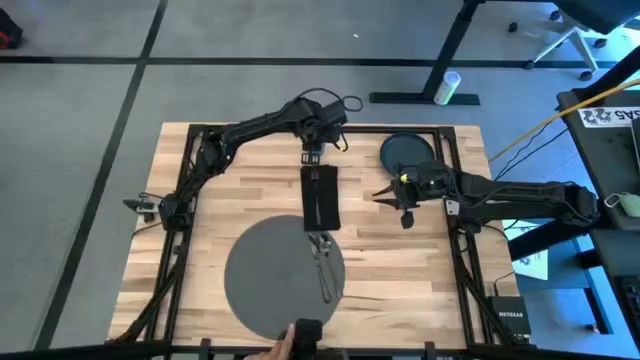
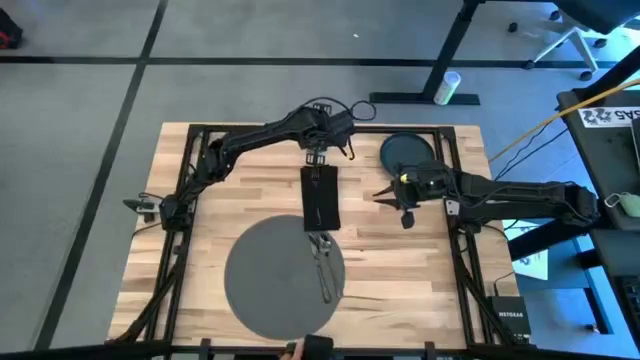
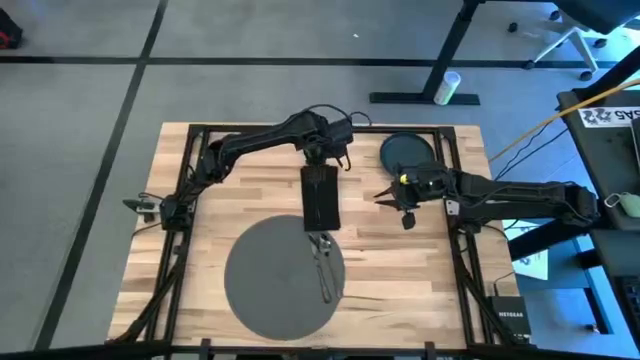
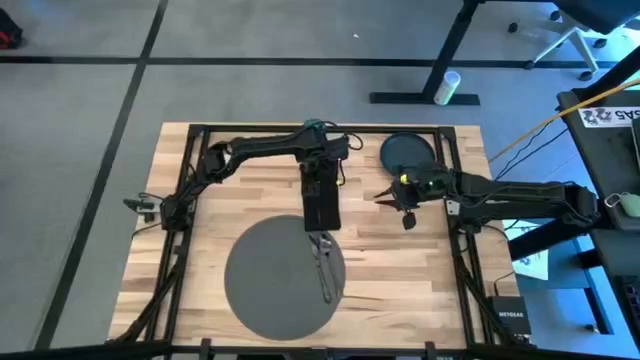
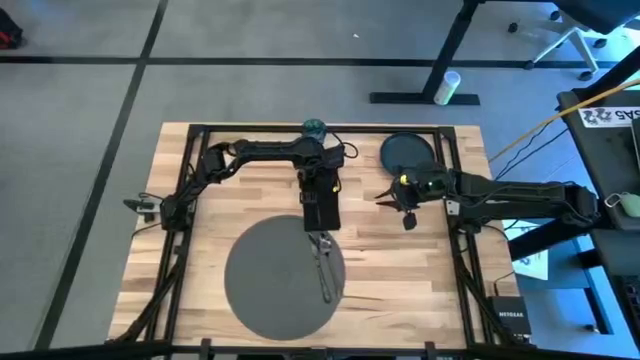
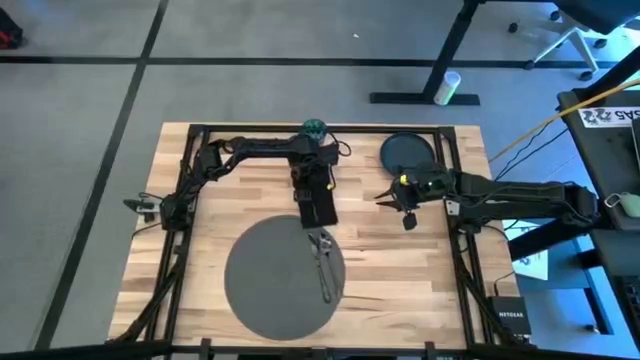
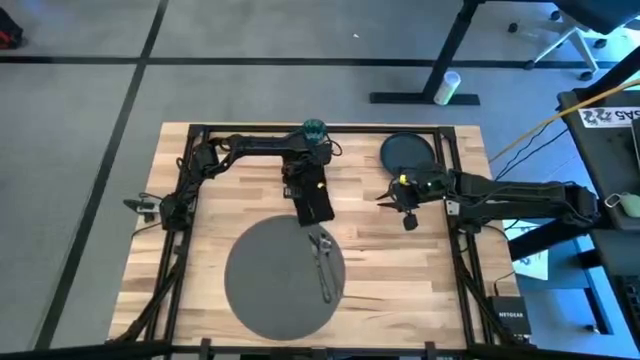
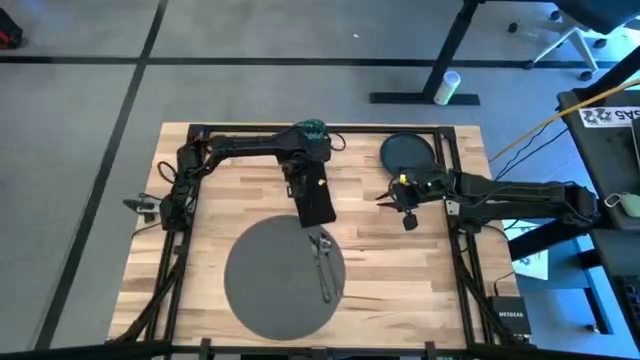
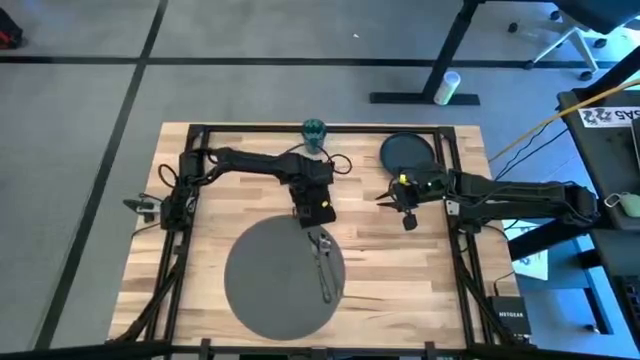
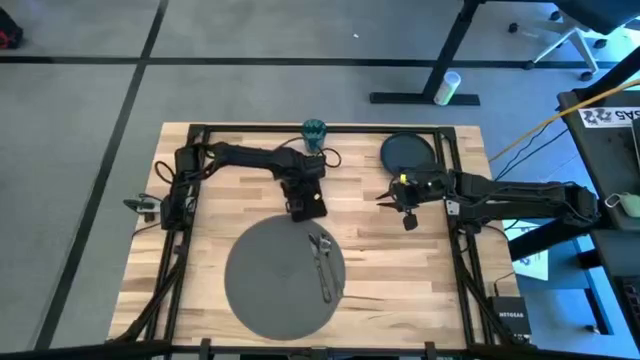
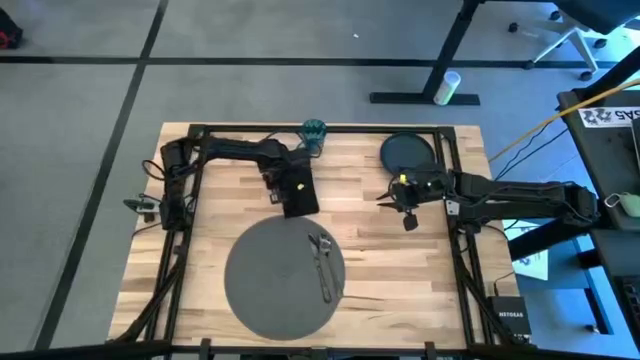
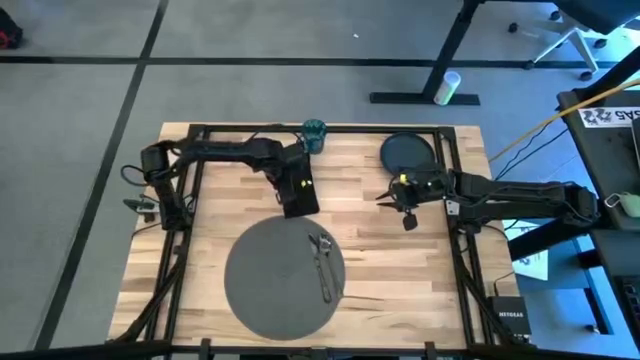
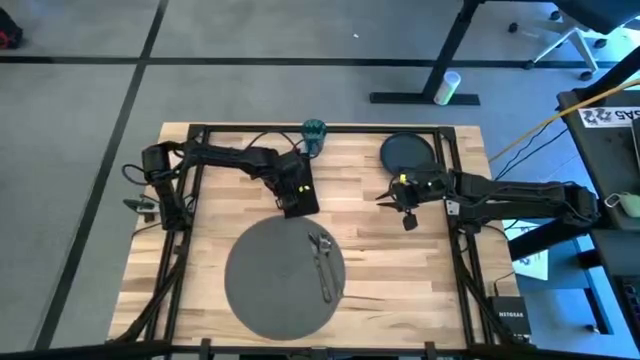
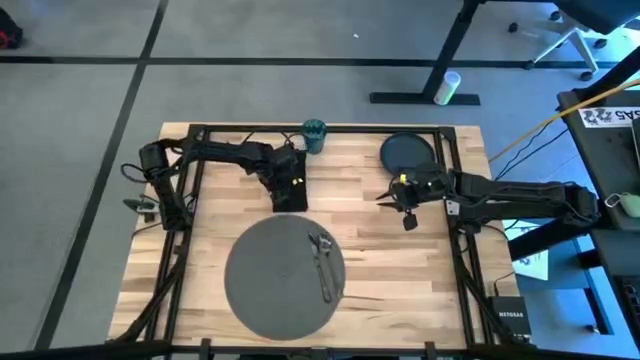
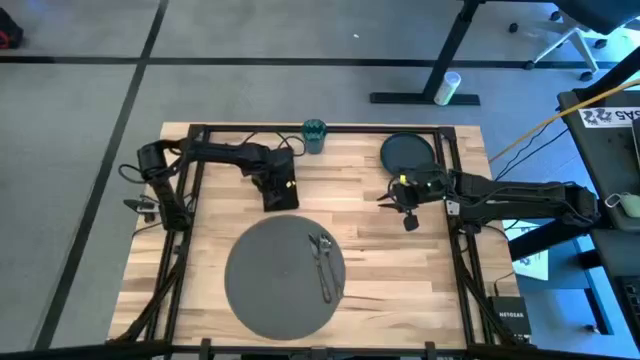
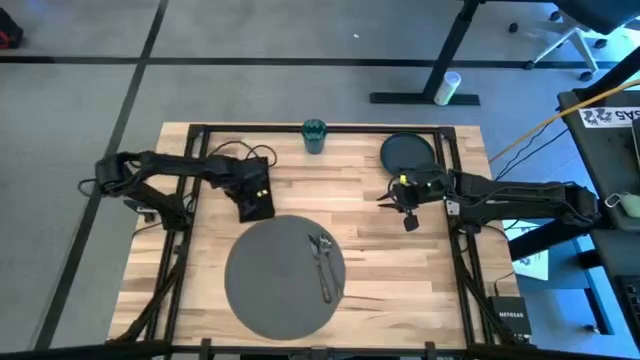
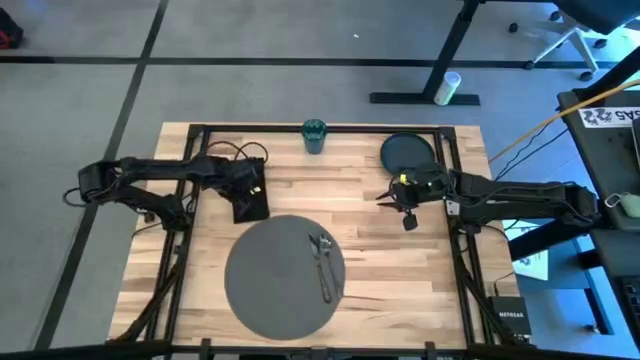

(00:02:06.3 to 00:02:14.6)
Task: Set table place
Adjust the black table napkin

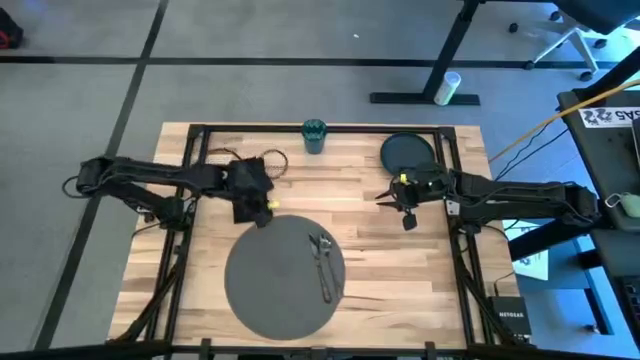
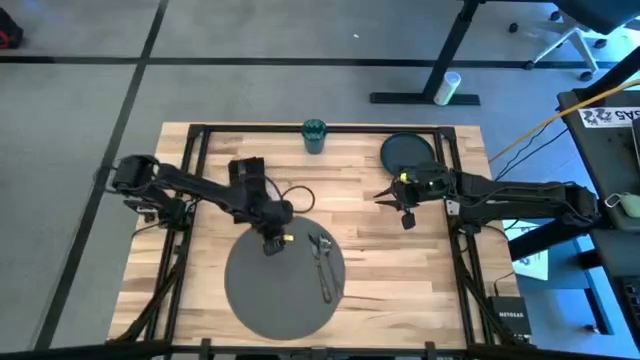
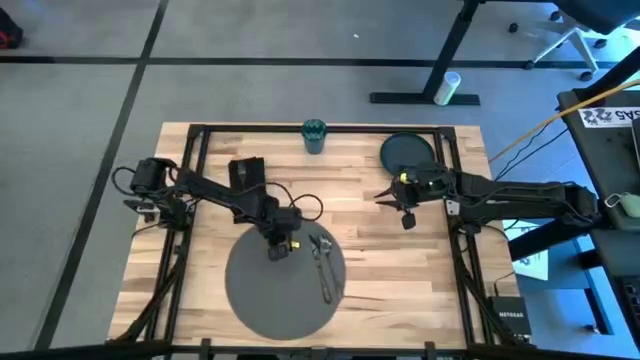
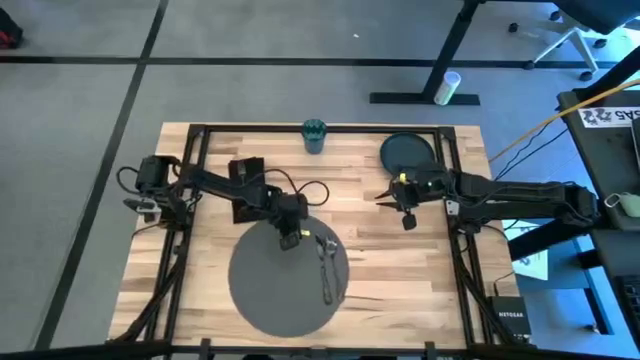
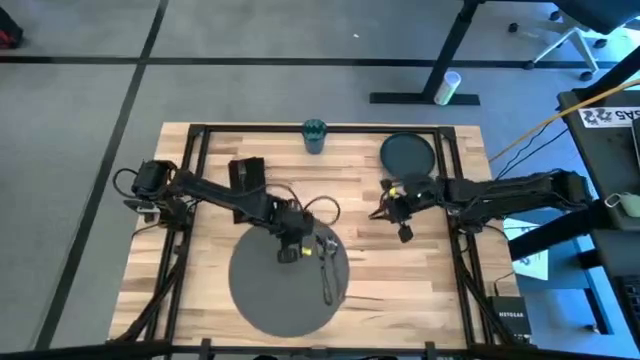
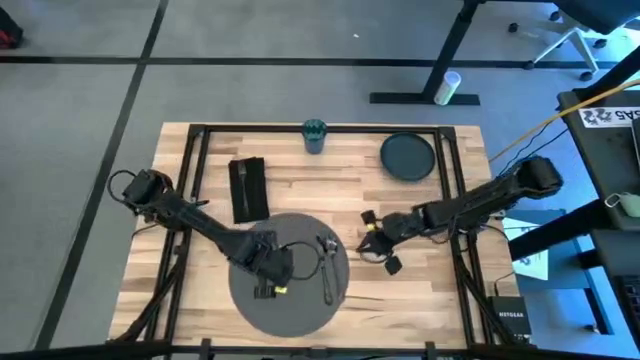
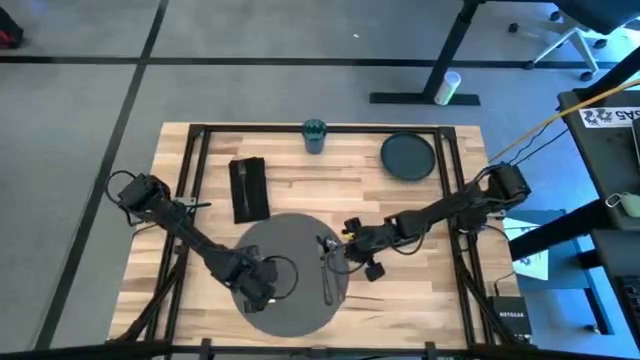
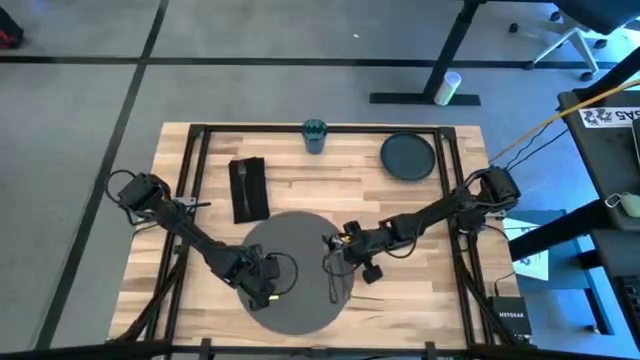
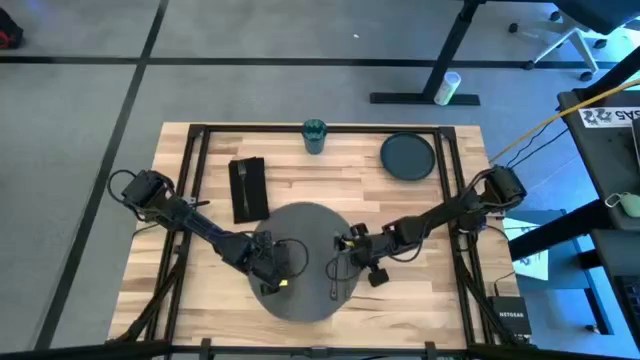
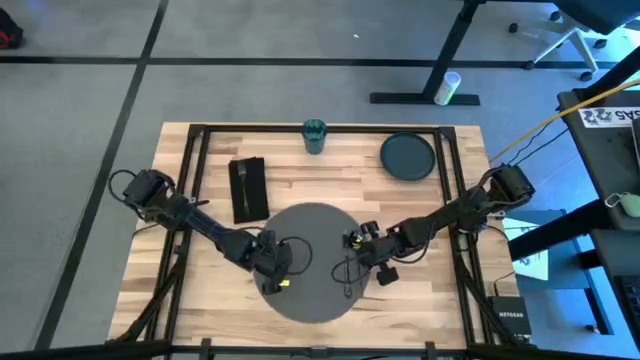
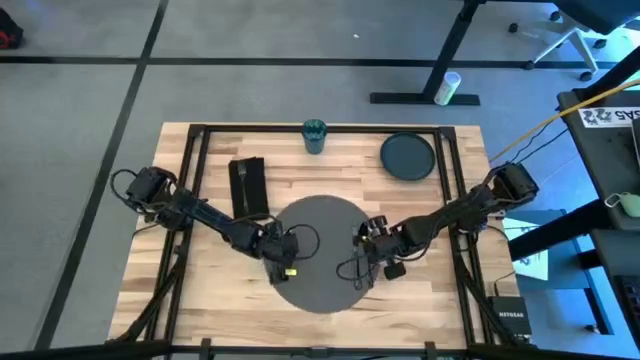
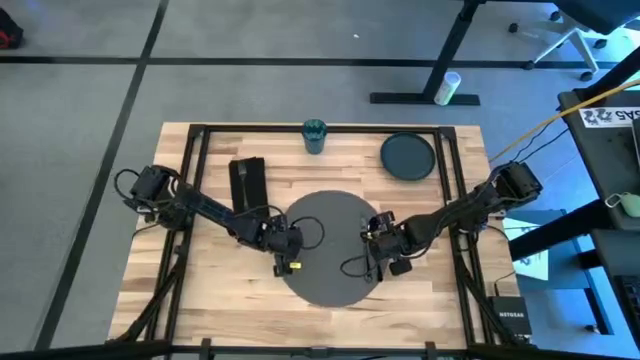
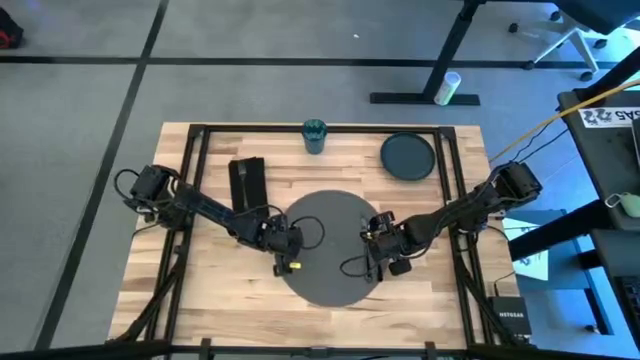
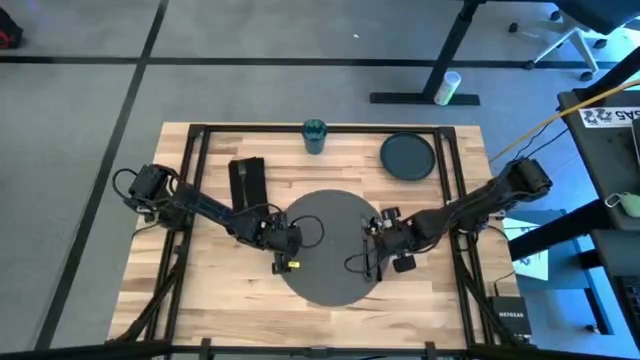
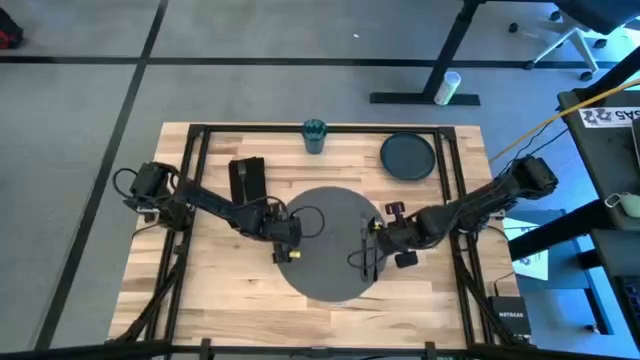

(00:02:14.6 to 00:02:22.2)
Adjust the black table mat

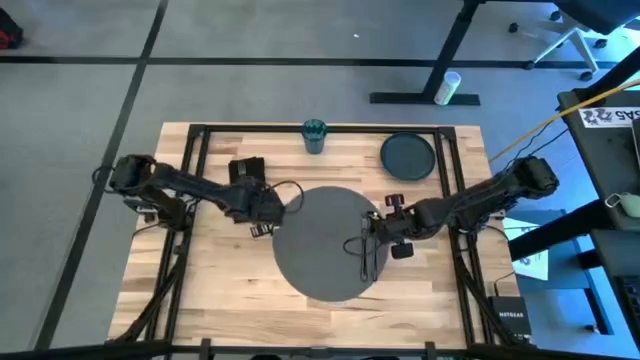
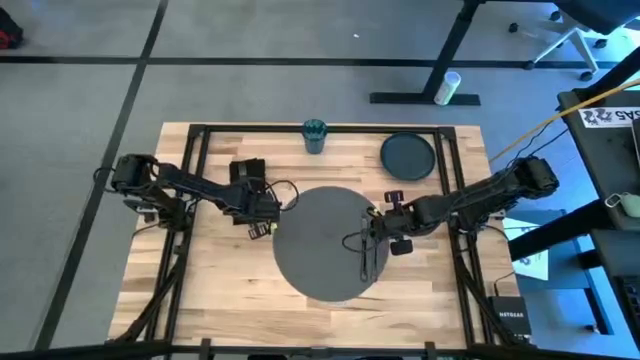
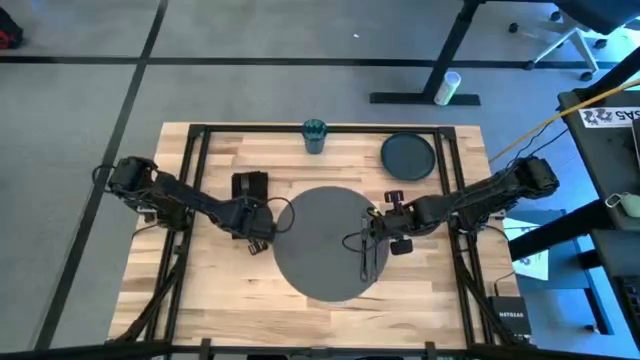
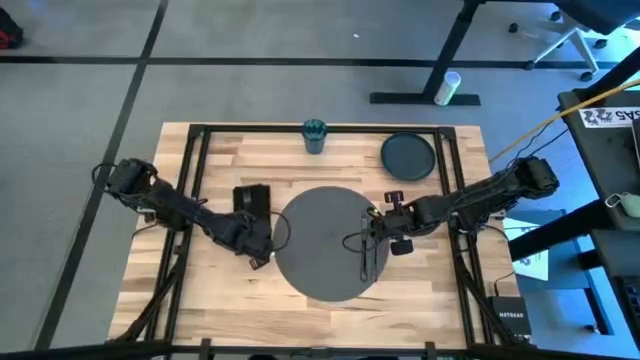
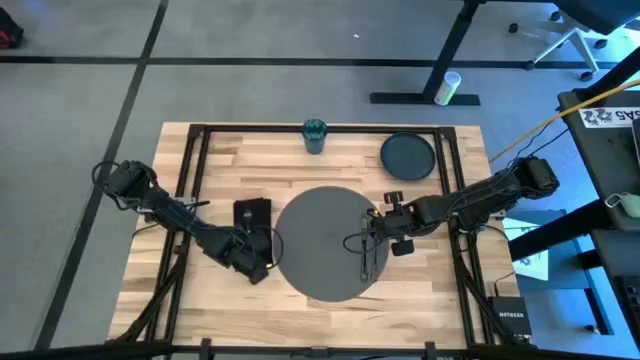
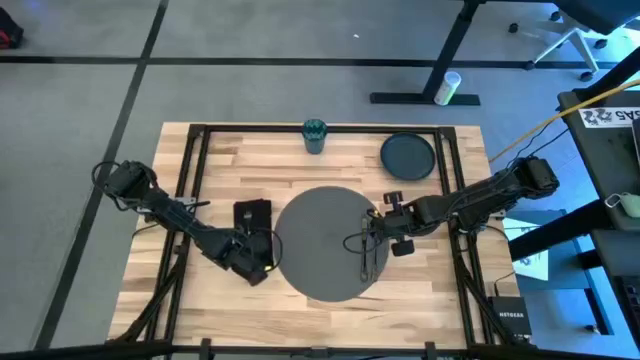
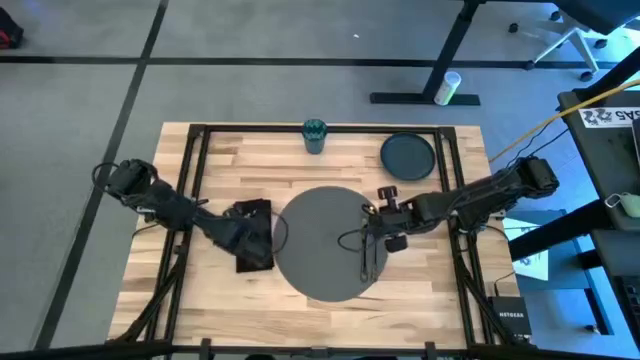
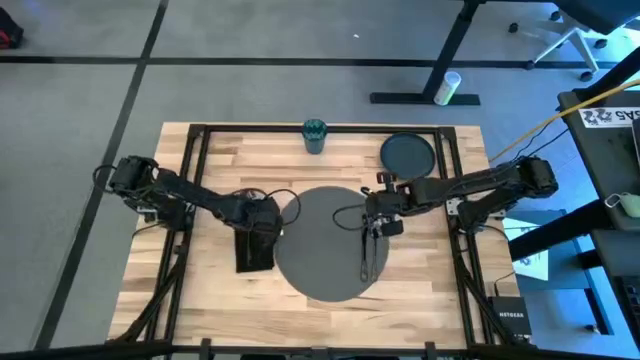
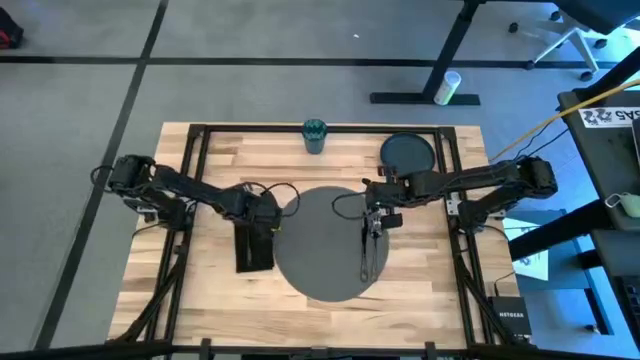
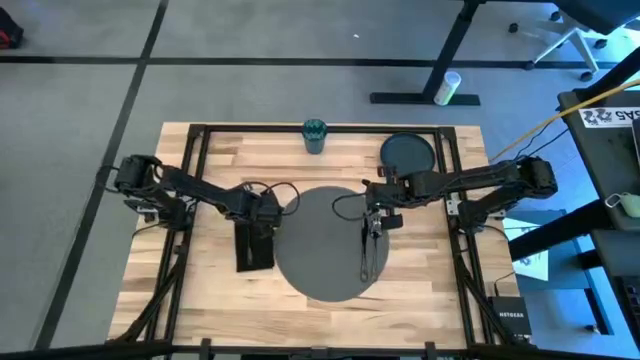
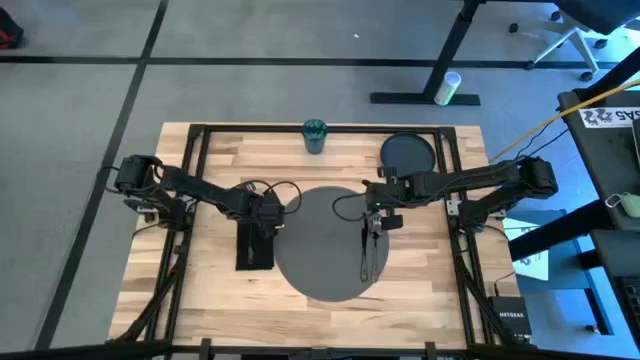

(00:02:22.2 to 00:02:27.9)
Adjust the black table napkin
